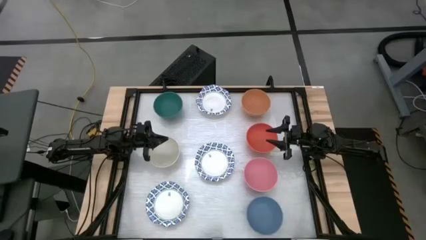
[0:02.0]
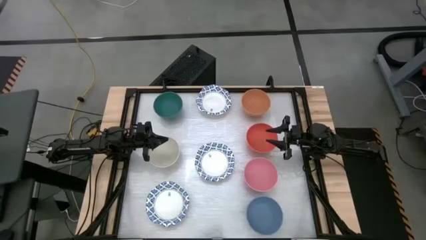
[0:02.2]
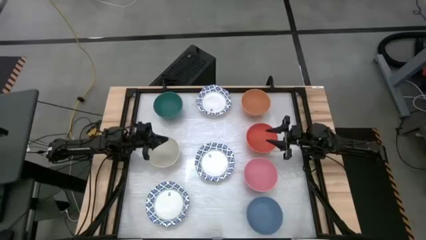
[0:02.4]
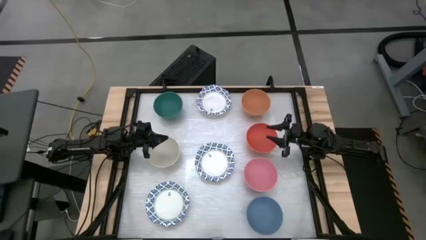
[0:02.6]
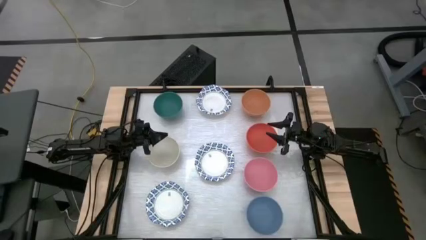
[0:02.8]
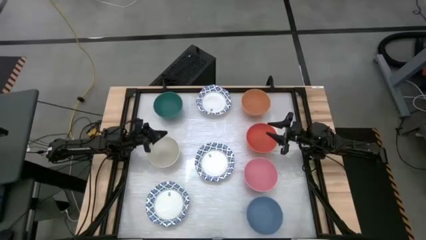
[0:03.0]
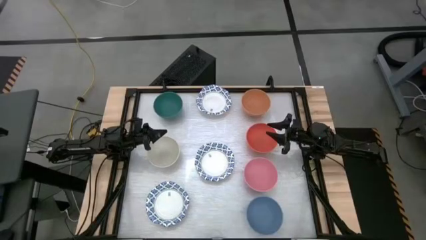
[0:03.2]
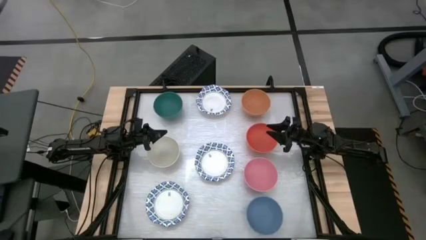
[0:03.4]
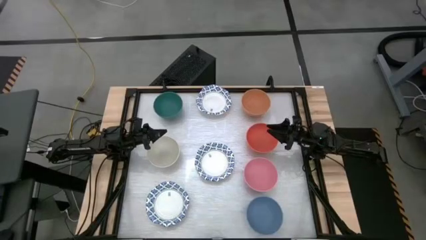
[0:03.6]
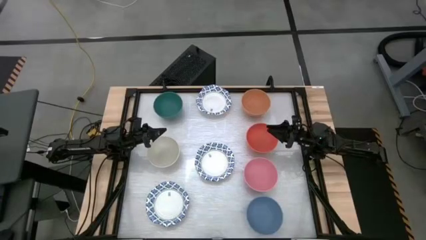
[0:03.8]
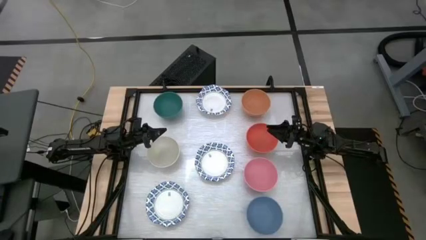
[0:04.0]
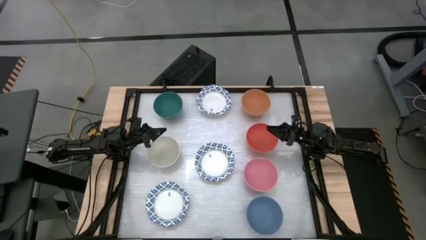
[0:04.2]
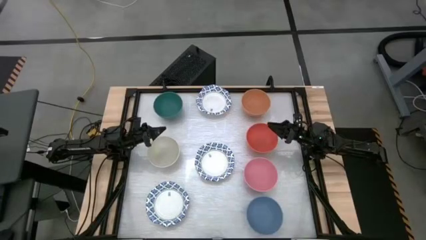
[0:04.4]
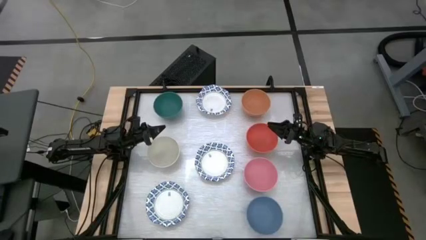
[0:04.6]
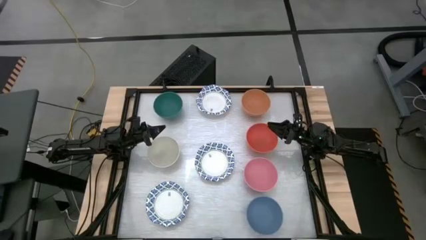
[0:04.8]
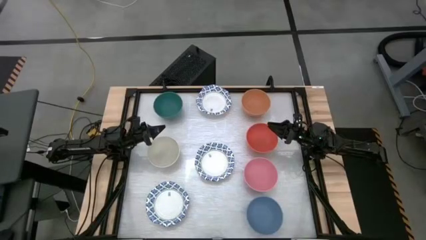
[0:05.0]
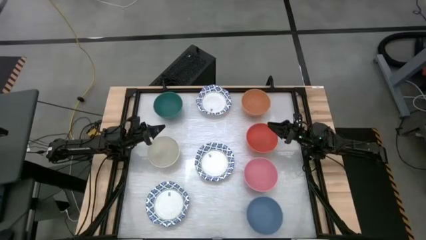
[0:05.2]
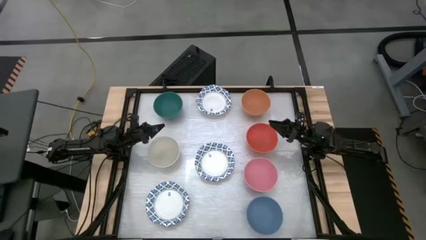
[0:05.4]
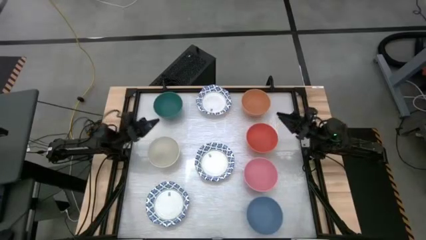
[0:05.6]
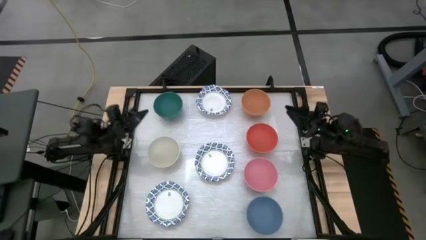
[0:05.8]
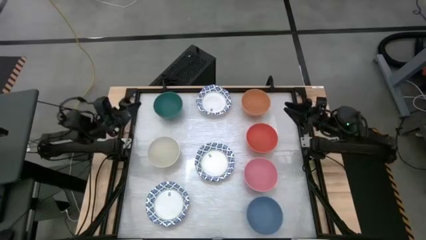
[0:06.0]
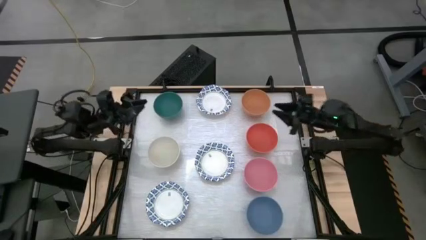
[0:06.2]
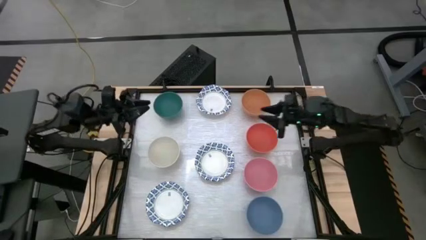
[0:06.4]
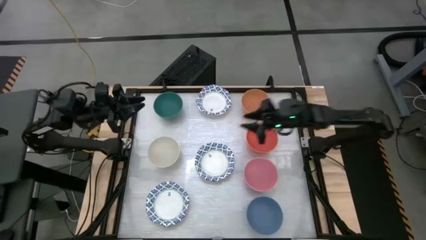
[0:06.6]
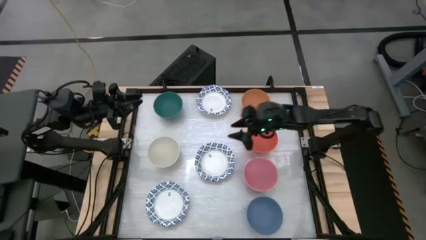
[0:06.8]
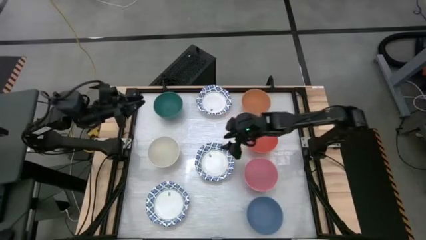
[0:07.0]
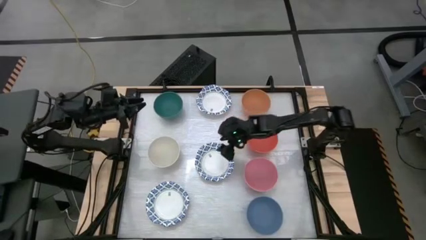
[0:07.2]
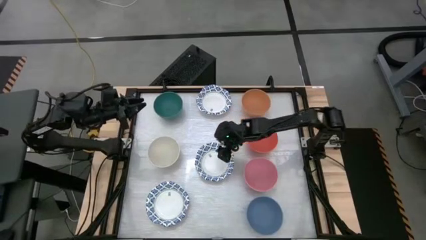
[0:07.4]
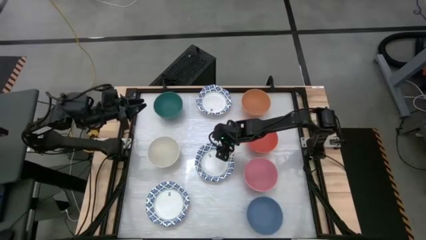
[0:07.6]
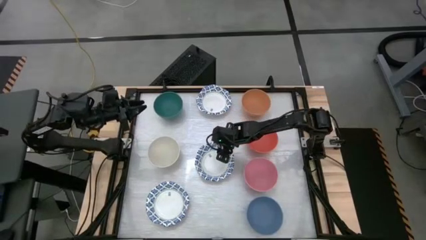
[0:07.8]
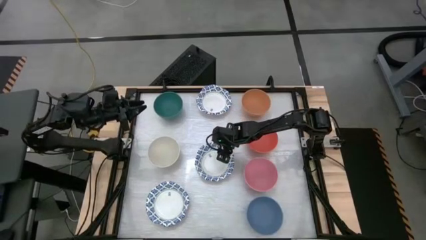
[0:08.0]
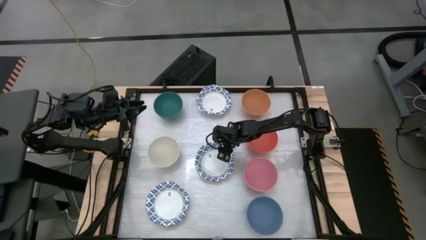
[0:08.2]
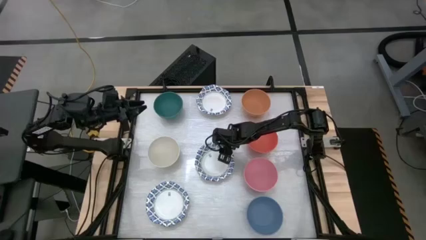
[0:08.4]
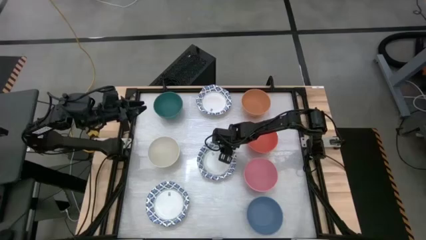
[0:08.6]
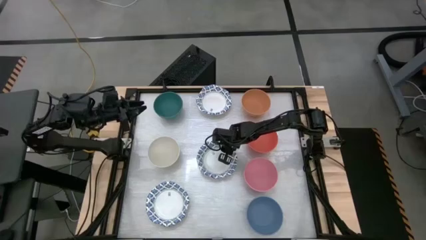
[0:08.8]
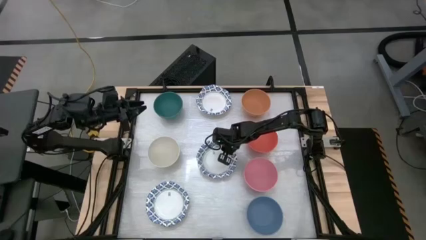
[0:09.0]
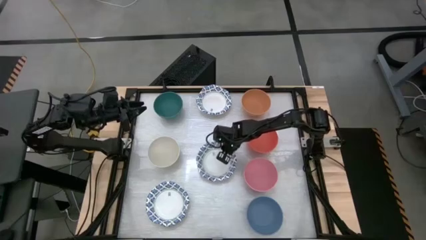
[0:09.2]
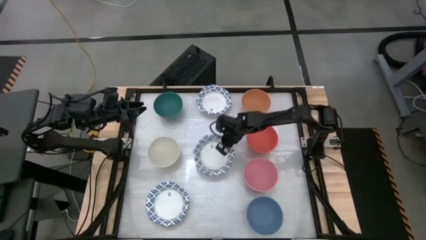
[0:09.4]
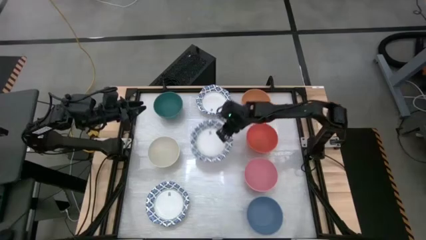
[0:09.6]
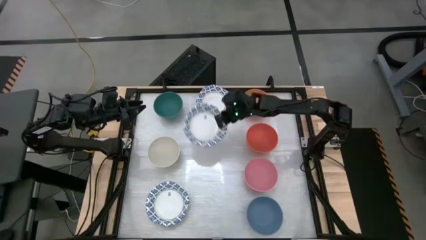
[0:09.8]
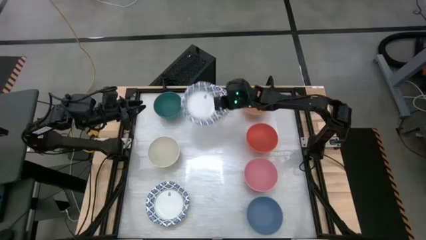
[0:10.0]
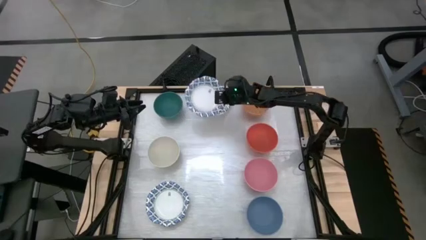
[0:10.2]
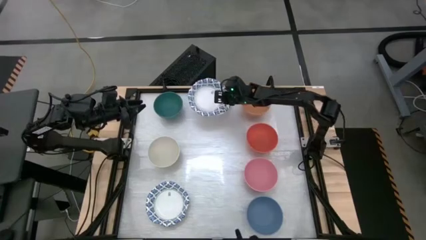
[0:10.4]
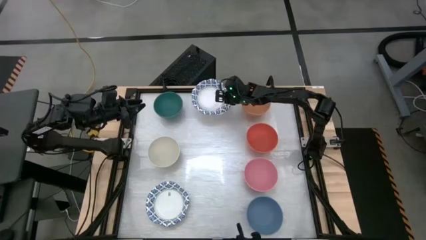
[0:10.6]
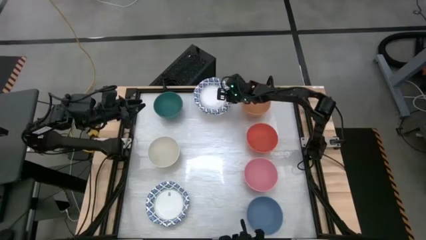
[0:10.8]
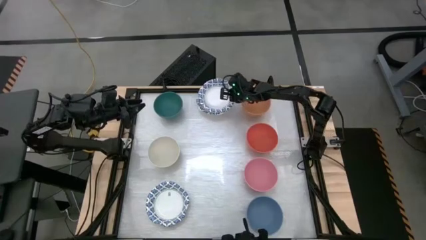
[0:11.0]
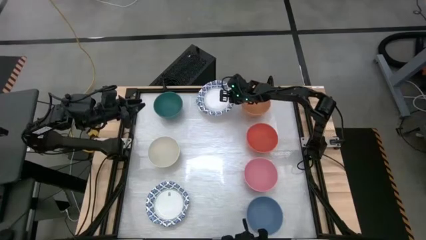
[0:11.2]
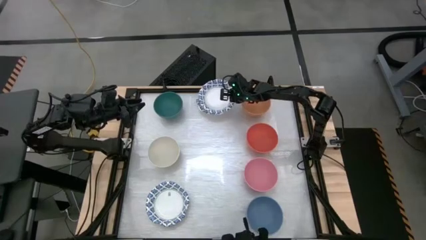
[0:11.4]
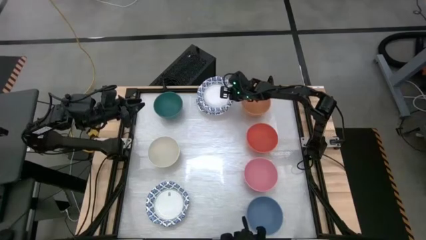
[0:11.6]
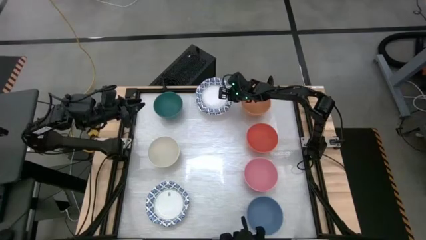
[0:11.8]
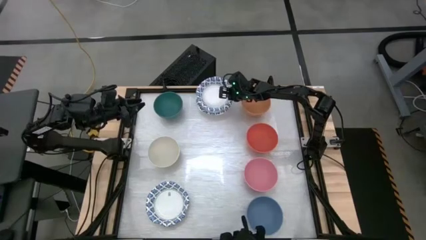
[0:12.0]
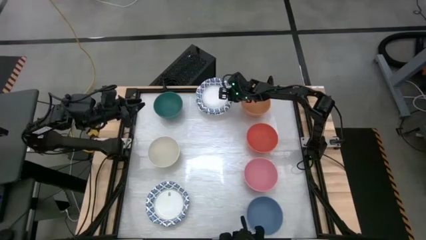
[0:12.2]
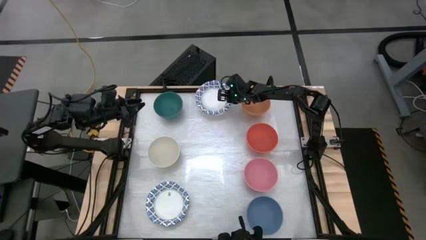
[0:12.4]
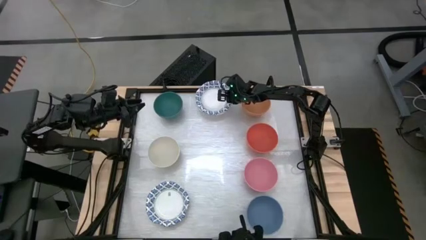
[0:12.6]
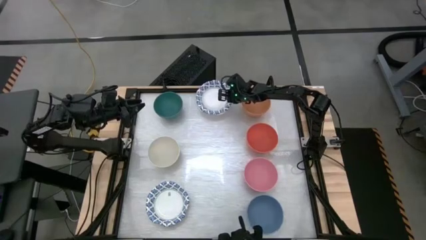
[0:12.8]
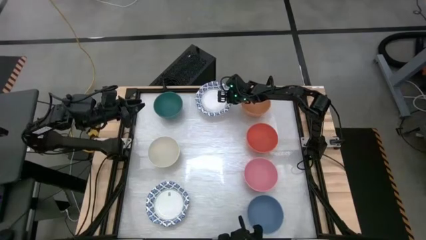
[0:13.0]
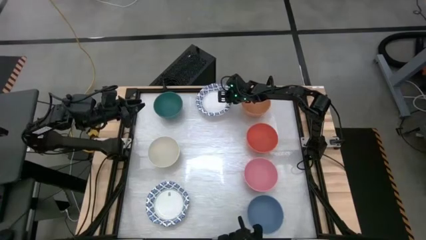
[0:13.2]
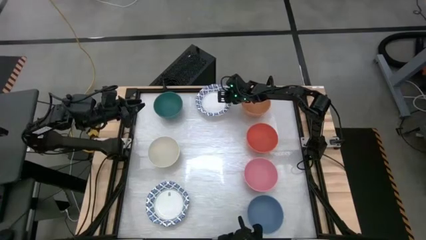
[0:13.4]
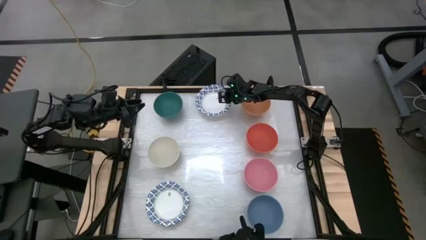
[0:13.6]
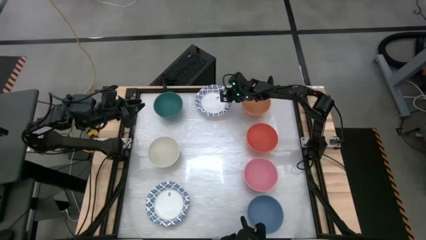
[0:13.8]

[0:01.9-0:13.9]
Task: Nest bowls inside each other by size order
Stack the center white and blue plate on top of the top white and blue plate

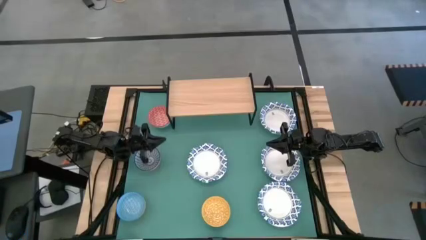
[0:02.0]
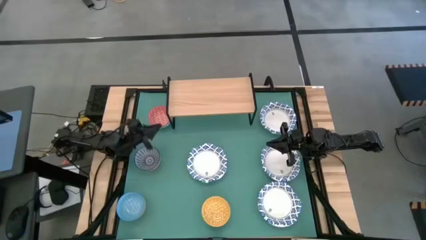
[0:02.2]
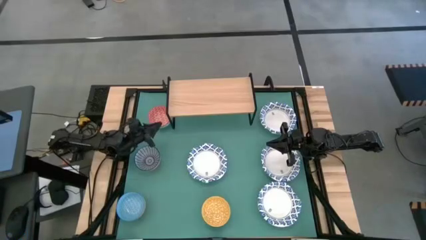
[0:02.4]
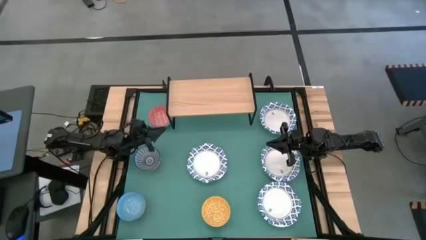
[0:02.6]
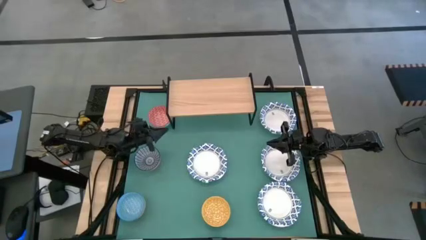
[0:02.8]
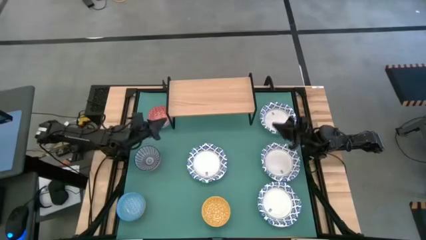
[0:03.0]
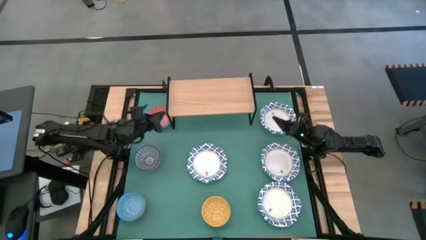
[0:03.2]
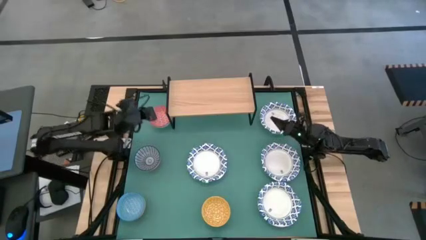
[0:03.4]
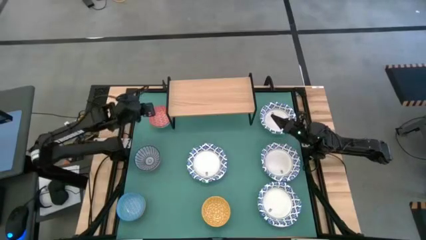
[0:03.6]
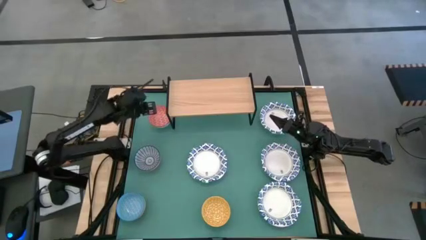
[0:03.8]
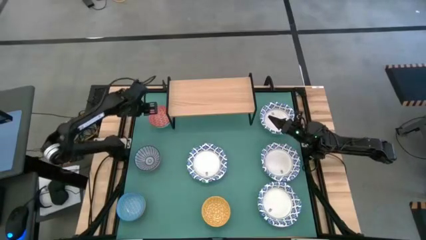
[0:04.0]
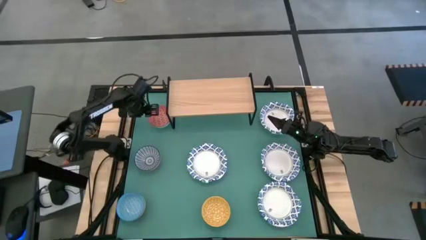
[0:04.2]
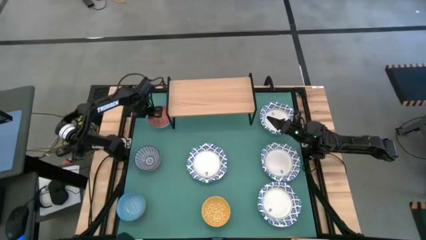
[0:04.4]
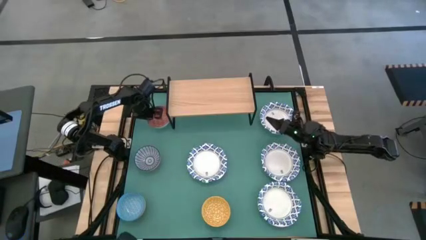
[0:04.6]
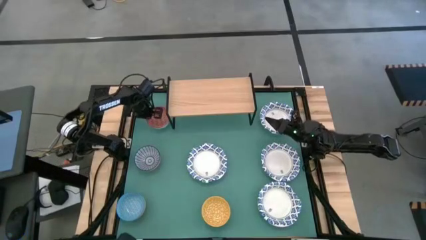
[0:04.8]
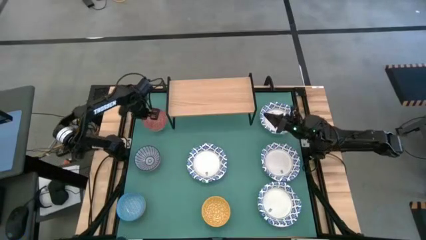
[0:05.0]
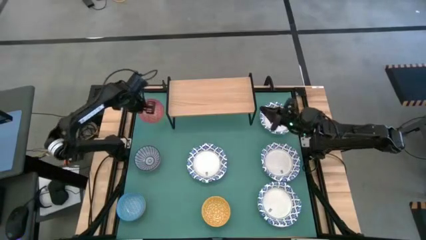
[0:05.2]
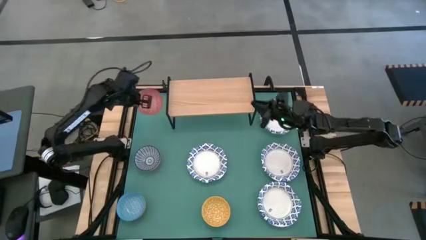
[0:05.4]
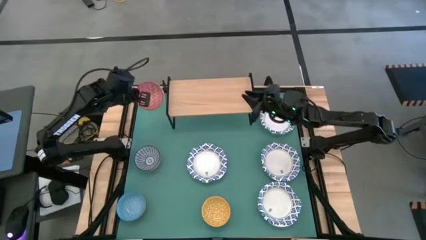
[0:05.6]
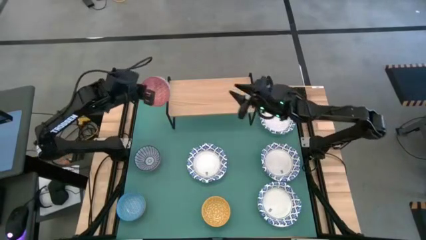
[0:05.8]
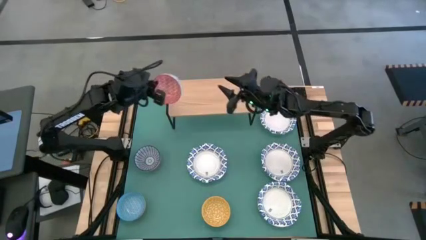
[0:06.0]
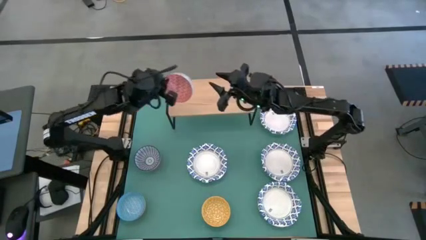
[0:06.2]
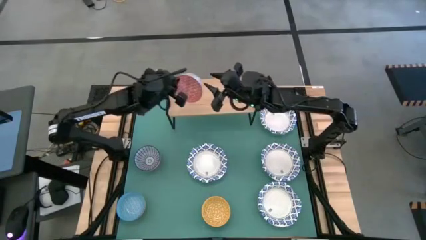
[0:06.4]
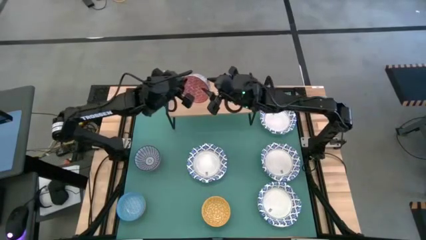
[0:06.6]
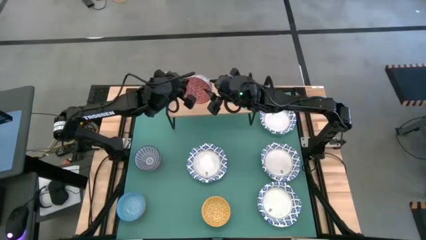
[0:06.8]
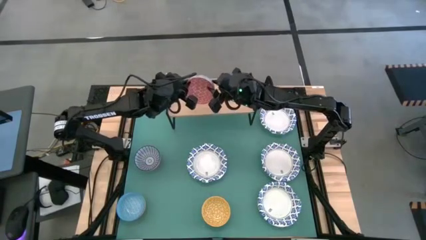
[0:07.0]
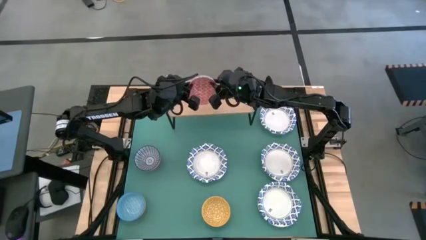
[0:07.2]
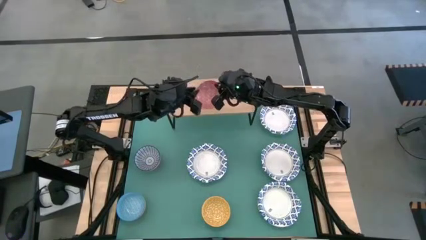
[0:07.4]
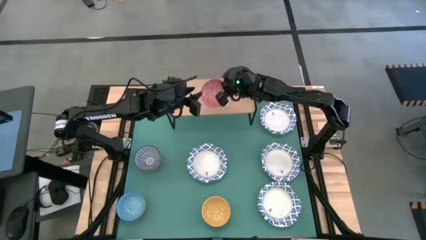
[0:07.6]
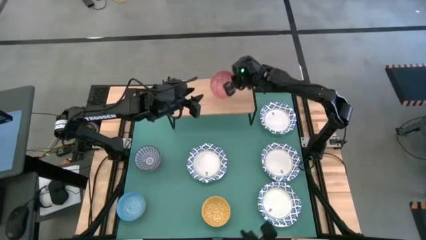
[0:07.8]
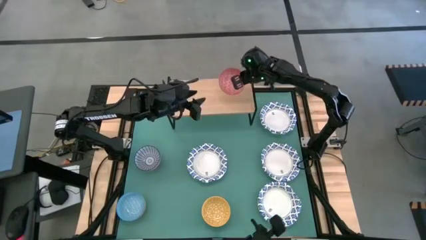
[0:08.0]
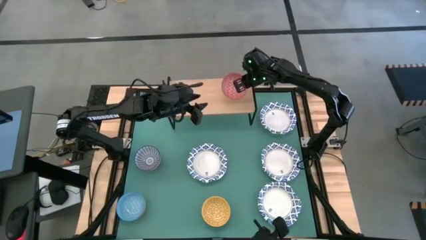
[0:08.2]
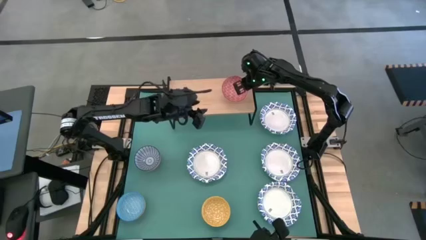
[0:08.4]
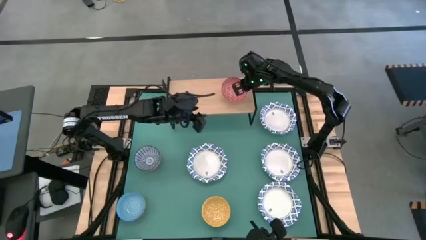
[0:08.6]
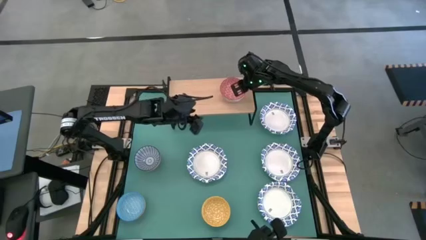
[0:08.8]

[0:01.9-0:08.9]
Task: Place and stack bowls onto a shelf
Put the red bowl on the shelf
